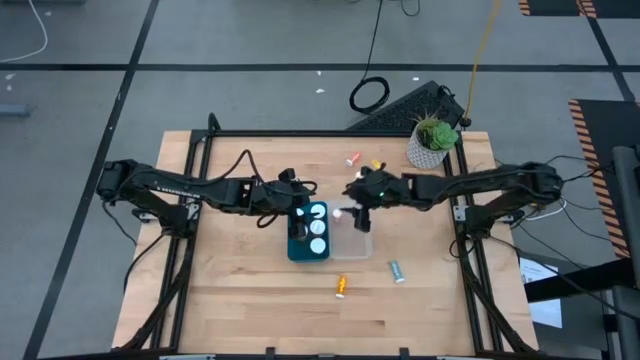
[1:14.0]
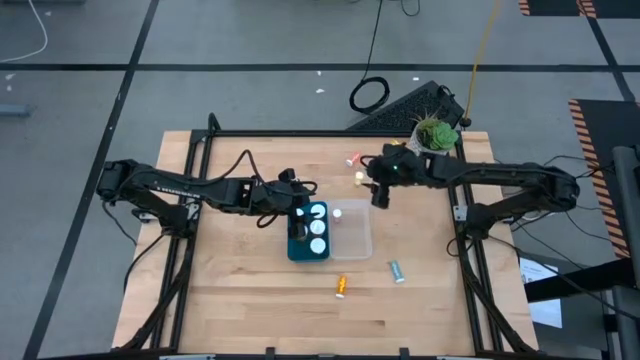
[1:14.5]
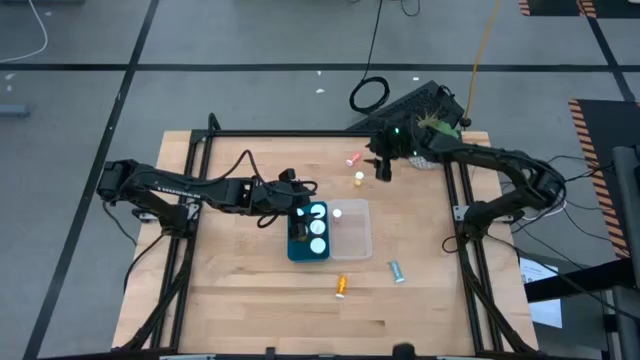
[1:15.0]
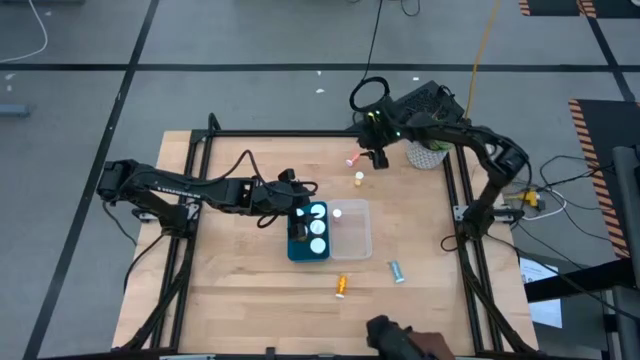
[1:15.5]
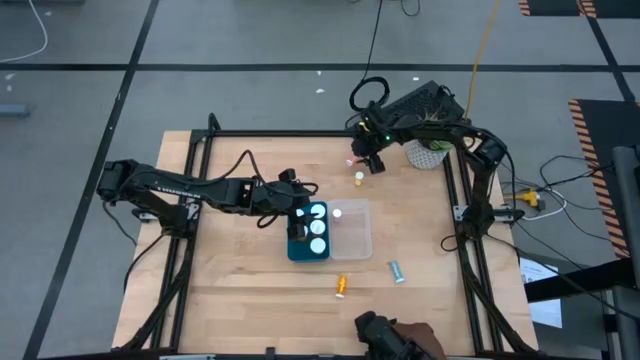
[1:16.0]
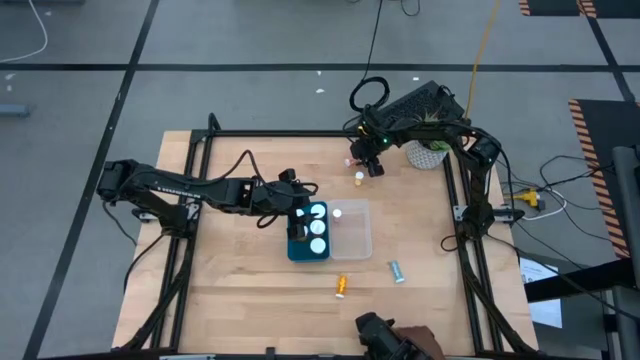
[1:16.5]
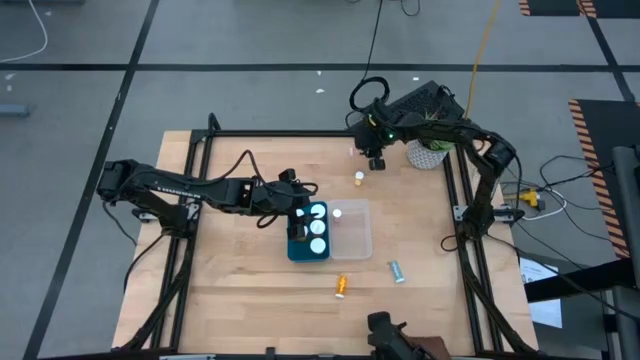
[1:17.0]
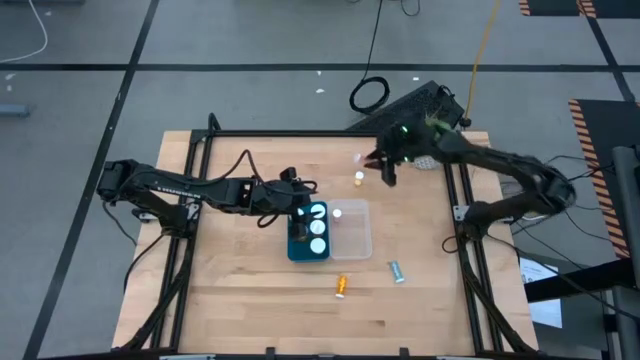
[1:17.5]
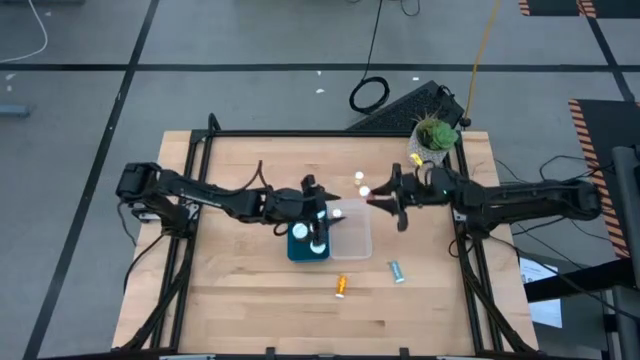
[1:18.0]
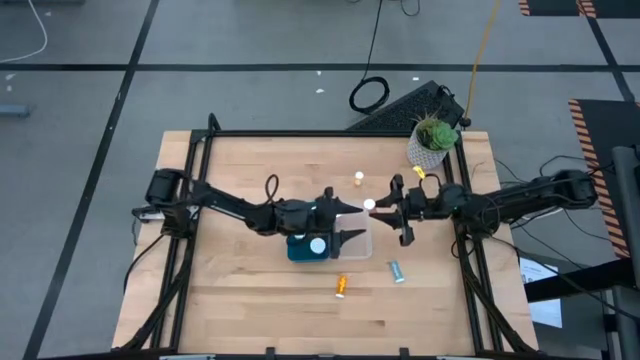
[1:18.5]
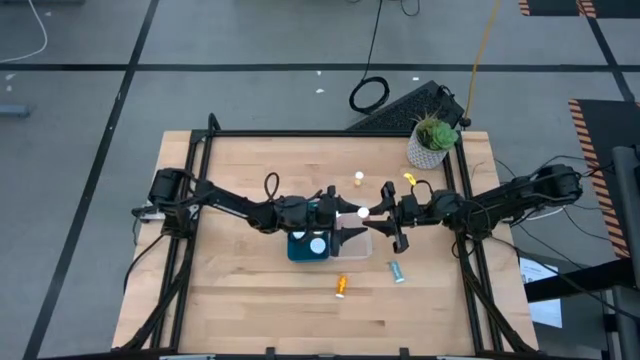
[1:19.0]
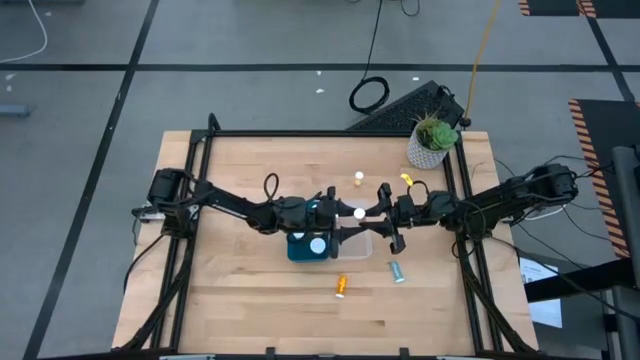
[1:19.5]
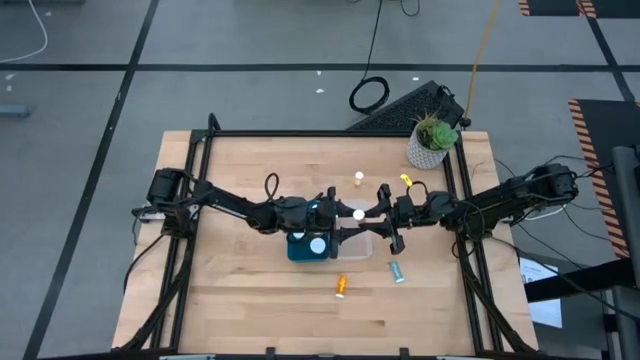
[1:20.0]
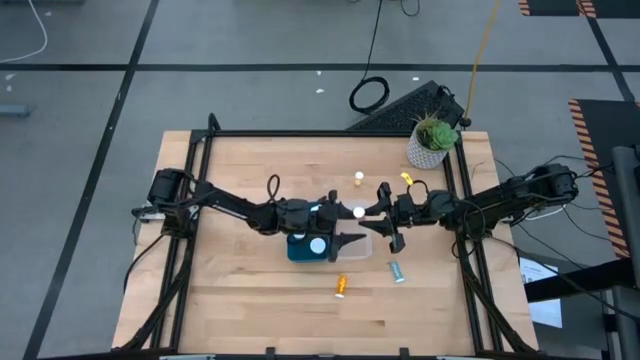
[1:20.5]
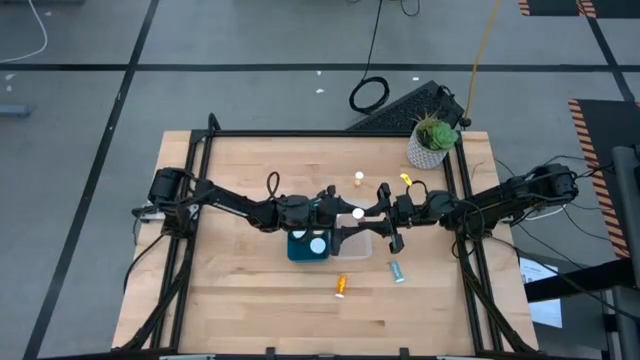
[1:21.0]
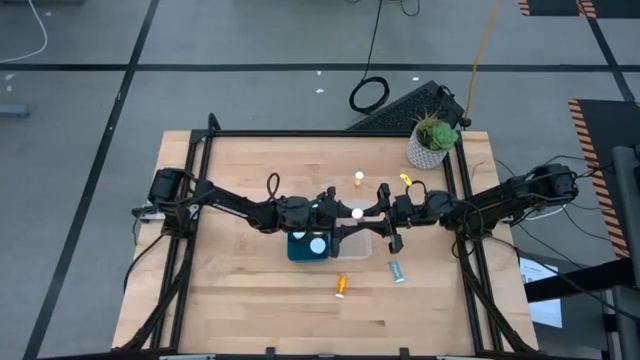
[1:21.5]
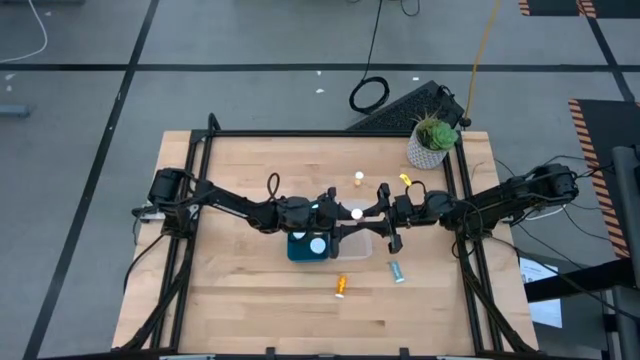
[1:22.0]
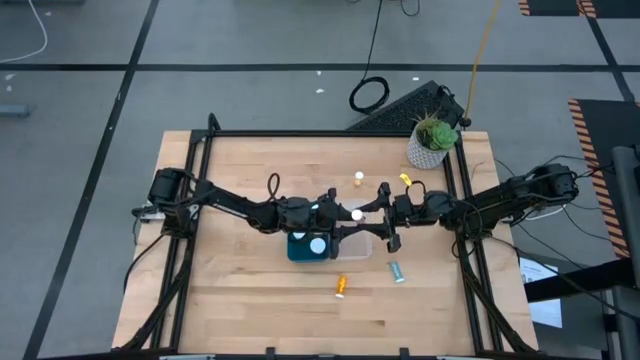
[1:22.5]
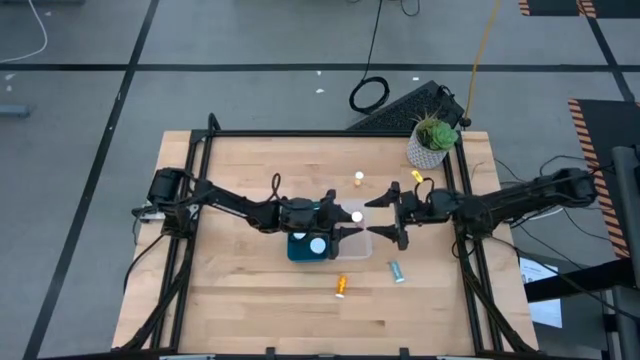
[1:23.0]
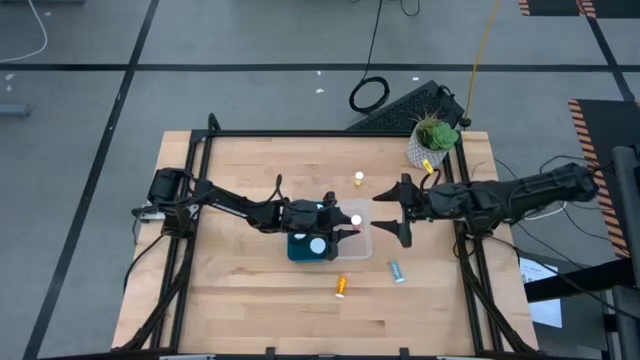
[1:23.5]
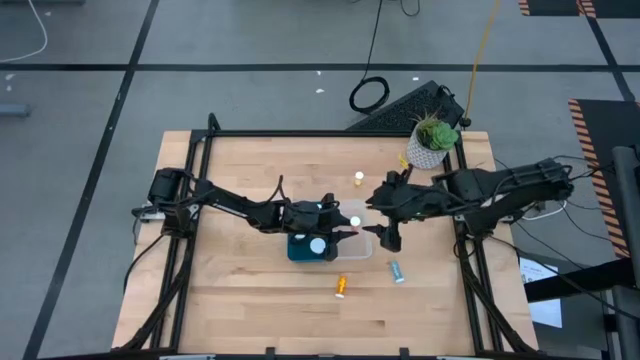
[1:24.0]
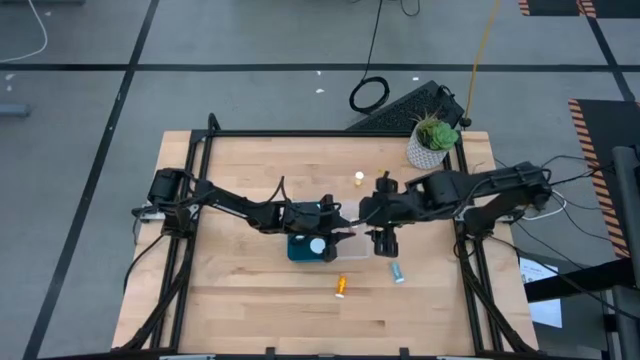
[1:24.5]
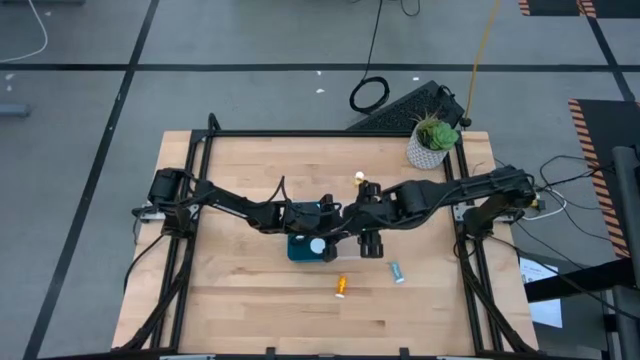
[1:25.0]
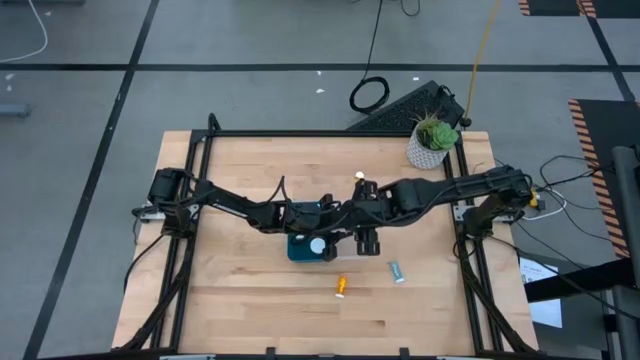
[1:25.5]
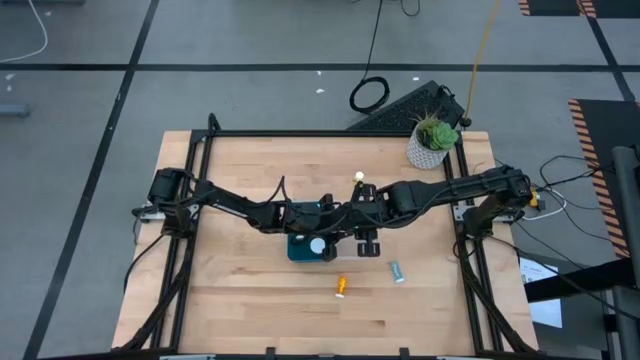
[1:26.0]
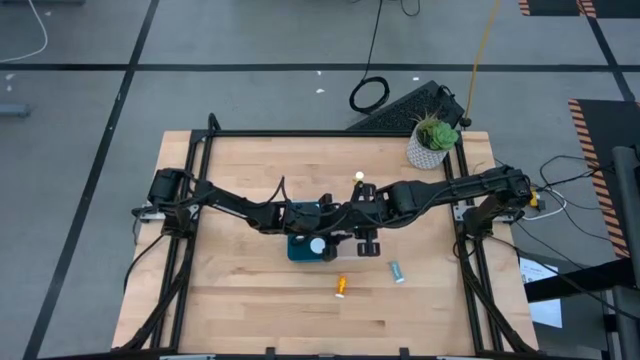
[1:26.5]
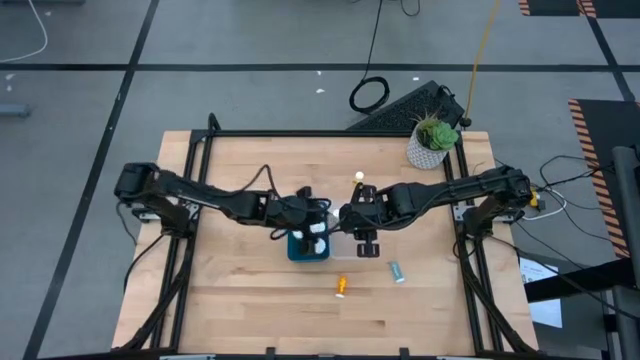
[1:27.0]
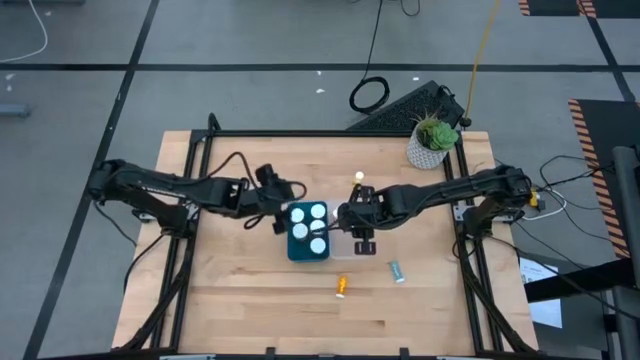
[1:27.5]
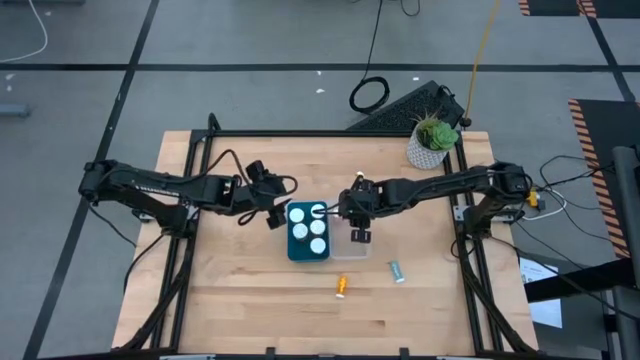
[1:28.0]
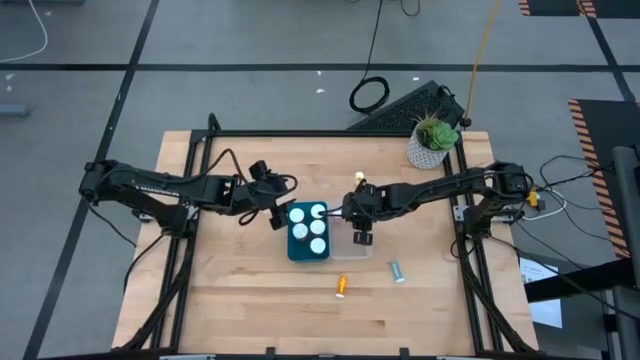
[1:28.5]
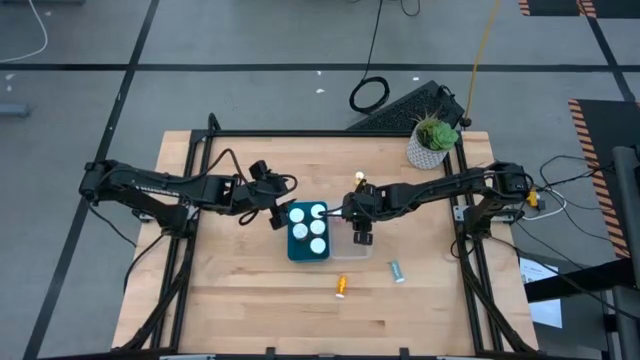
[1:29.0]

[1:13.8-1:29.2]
Task: Pick and place medicine bottles into bin by pill shape (circle, oval)
Put the small pink pill bottle into the transparent bin

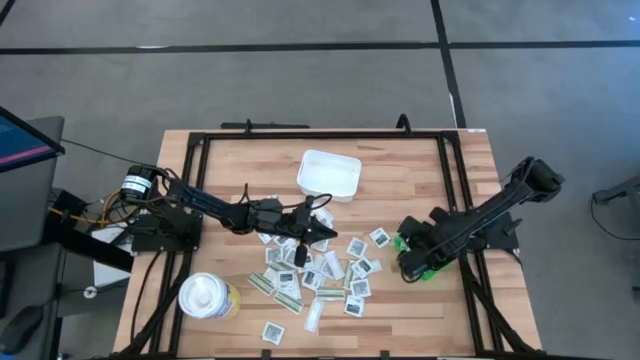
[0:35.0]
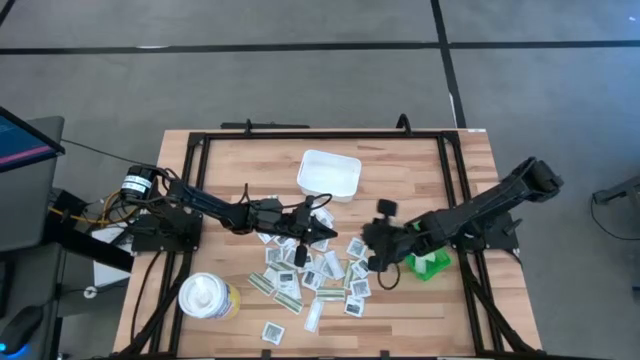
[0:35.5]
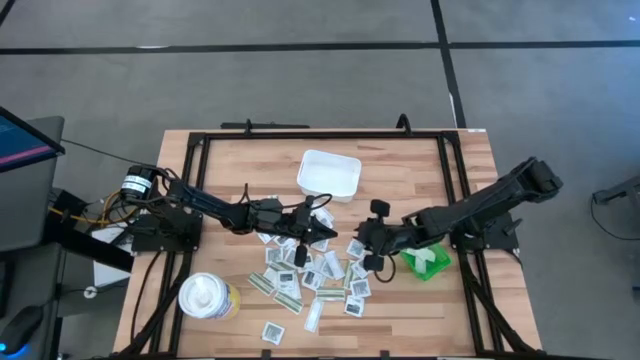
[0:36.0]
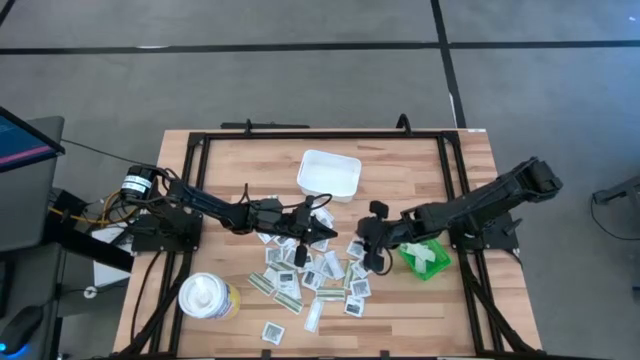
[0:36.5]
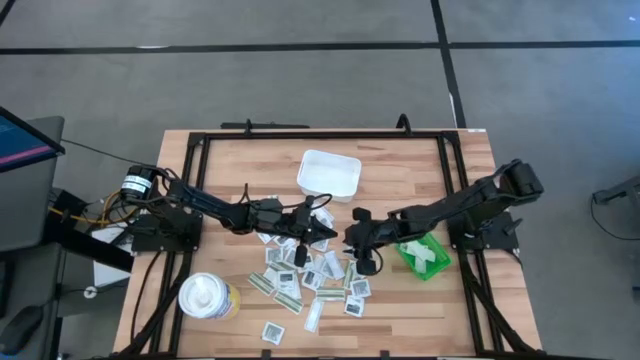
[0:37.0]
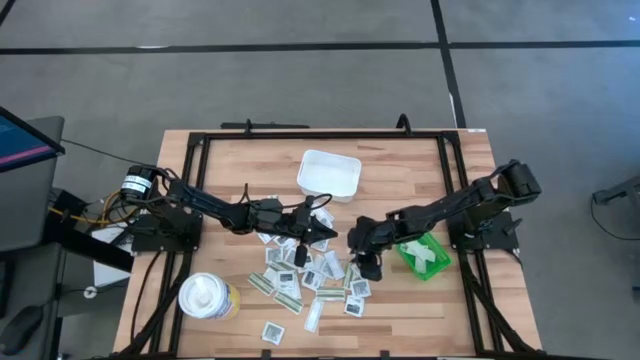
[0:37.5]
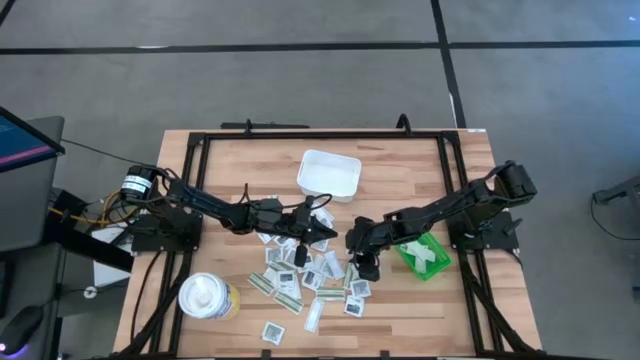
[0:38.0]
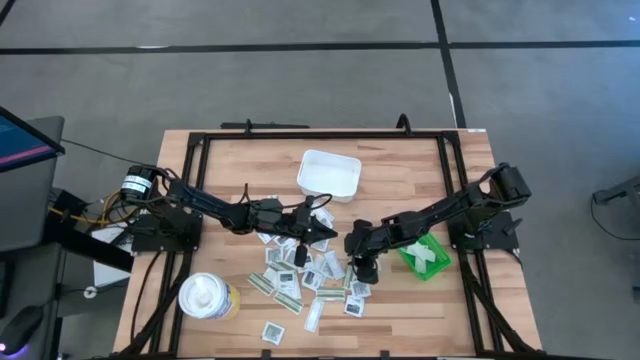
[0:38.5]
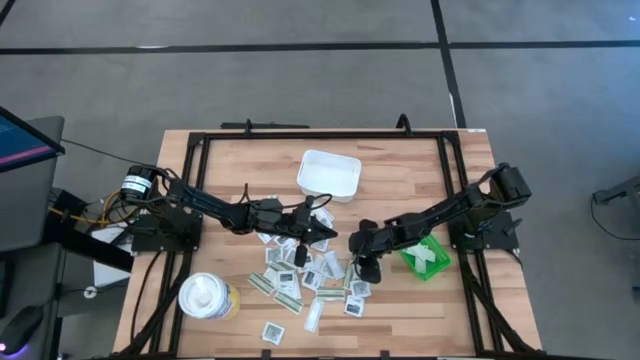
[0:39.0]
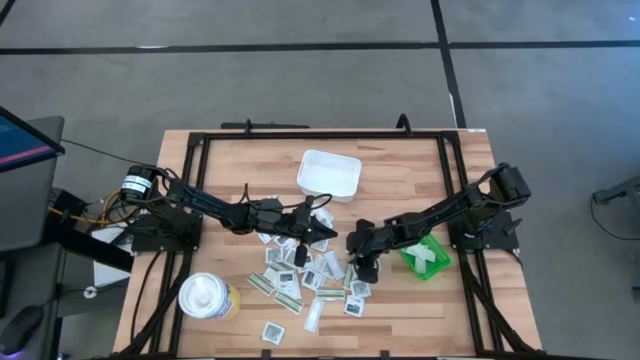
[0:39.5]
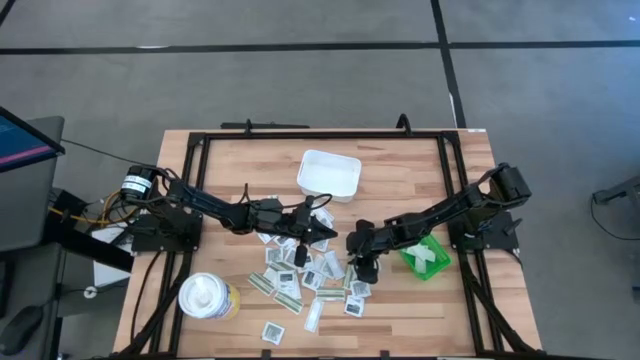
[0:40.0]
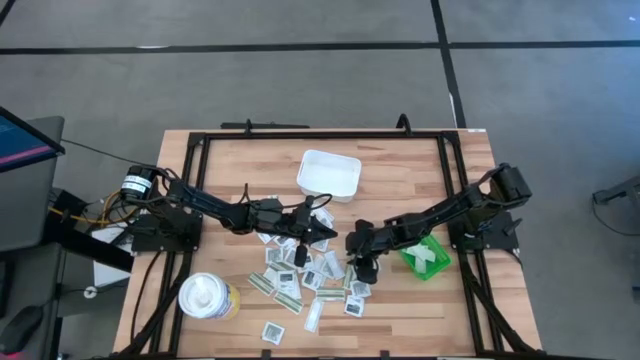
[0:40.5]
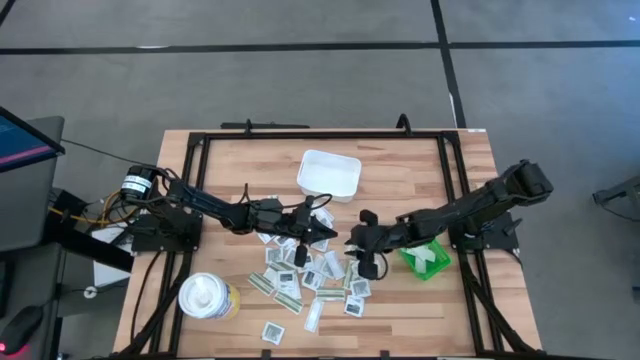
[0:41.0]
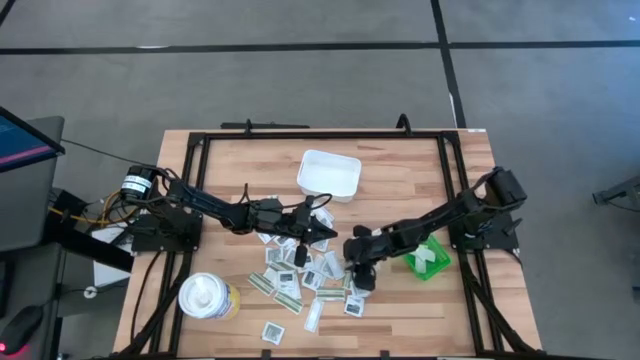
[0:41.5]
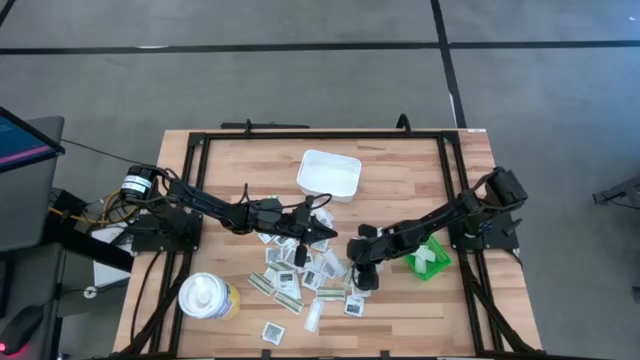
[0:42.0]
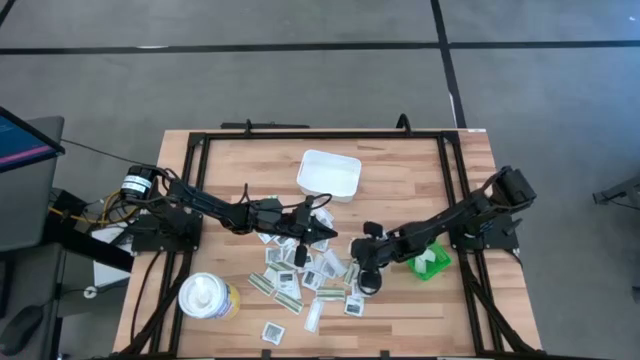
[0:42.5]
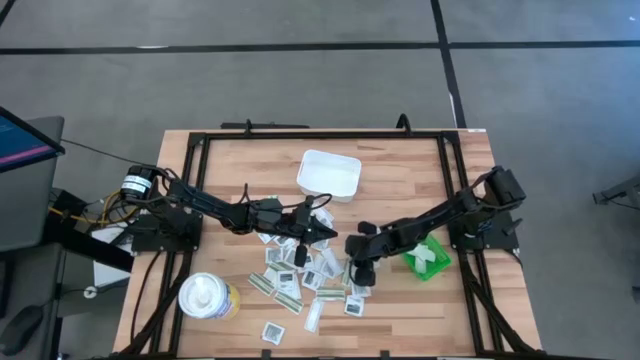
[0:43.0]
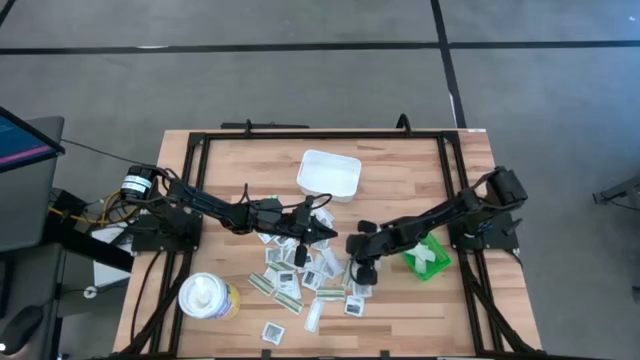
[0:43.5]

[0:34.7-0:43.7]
Task: Pick & Place First Aid Supplies
Put the bandage pack into the green bin
